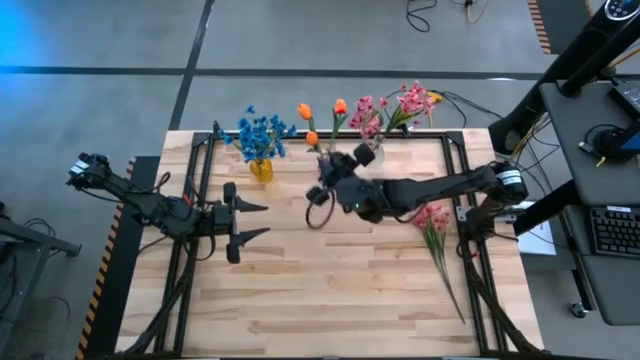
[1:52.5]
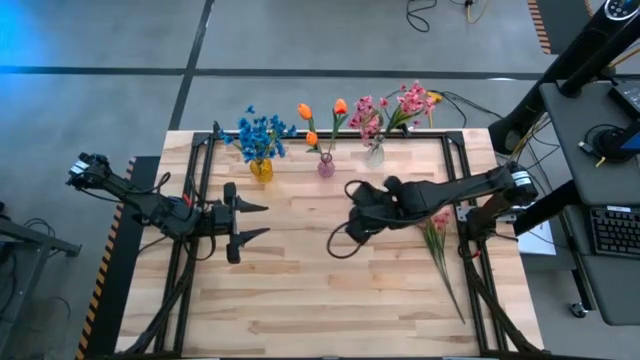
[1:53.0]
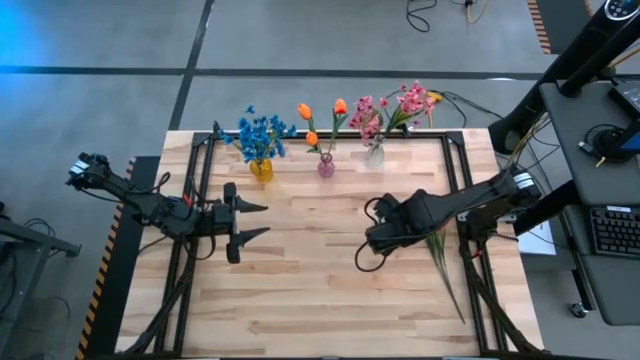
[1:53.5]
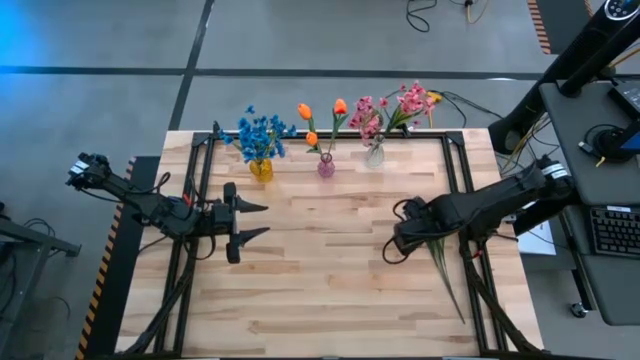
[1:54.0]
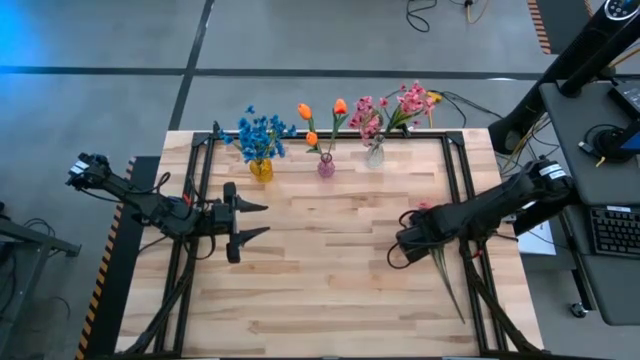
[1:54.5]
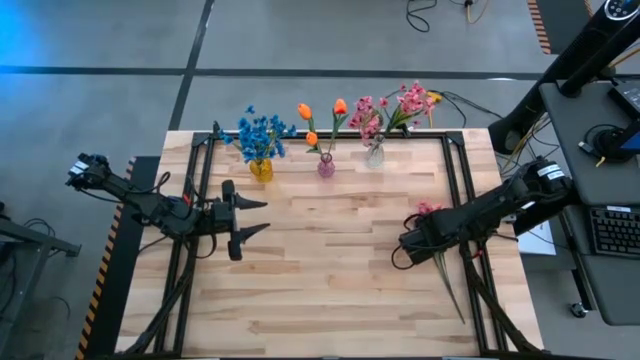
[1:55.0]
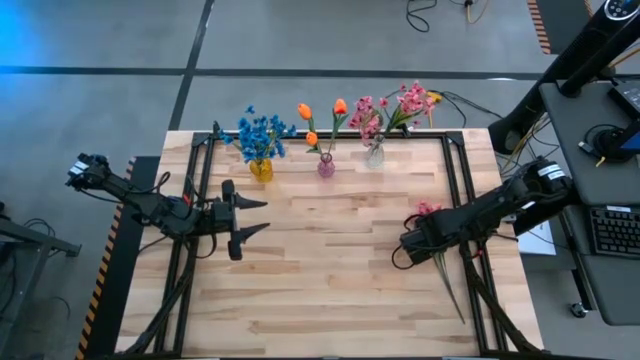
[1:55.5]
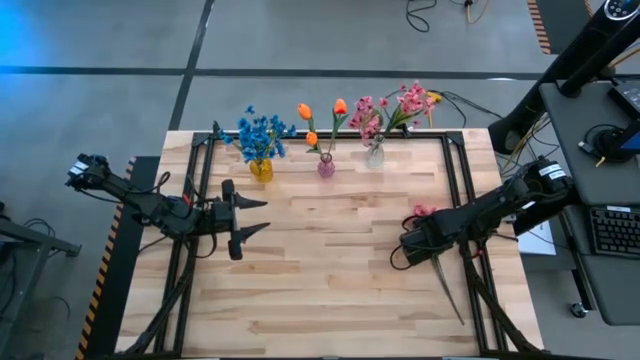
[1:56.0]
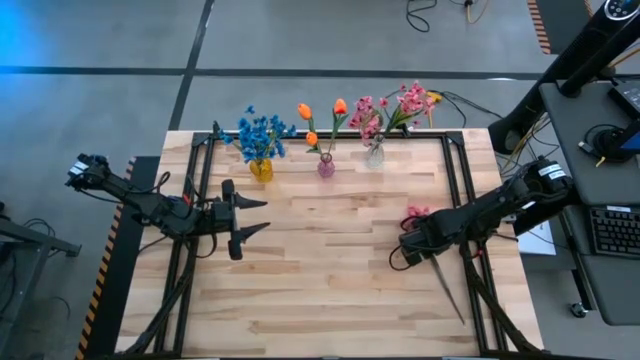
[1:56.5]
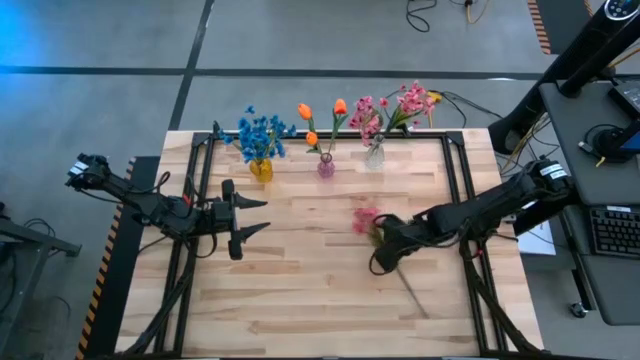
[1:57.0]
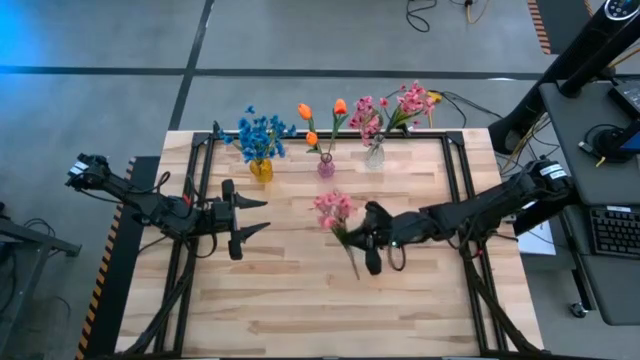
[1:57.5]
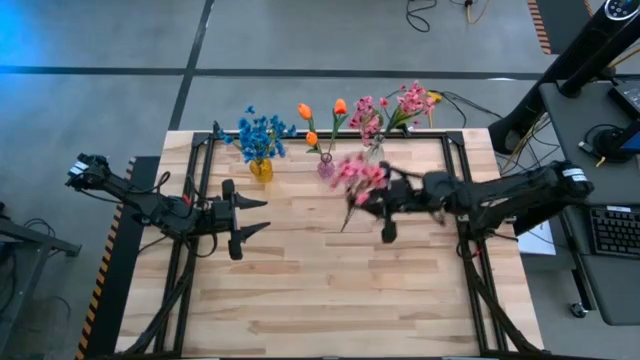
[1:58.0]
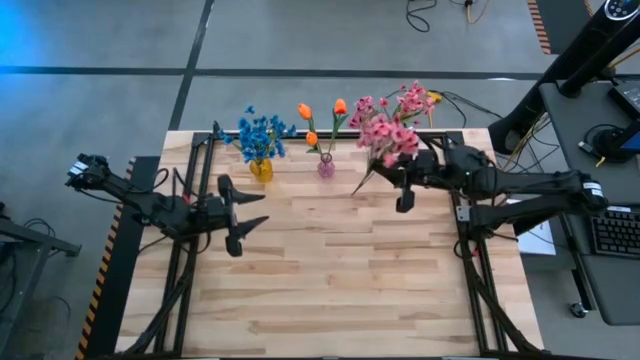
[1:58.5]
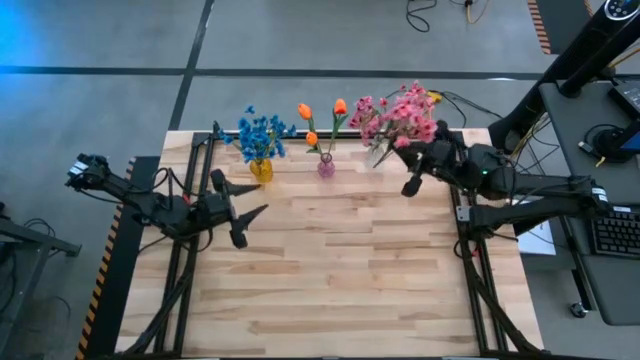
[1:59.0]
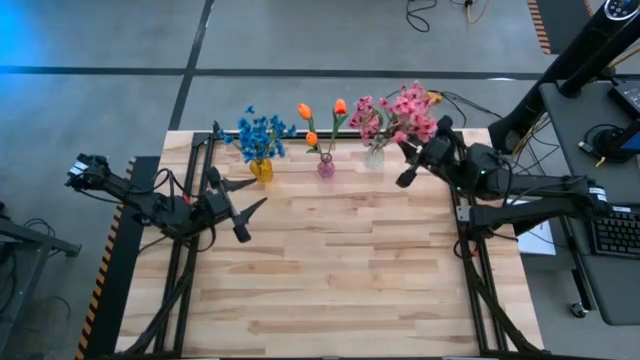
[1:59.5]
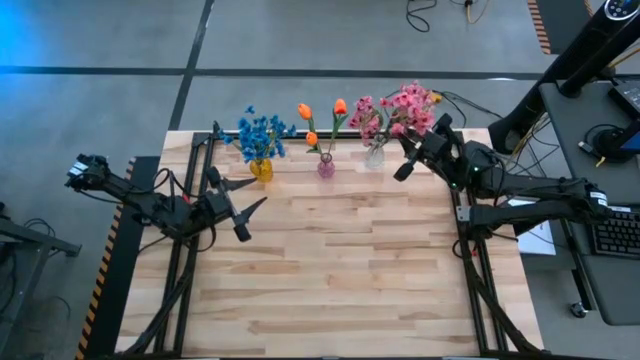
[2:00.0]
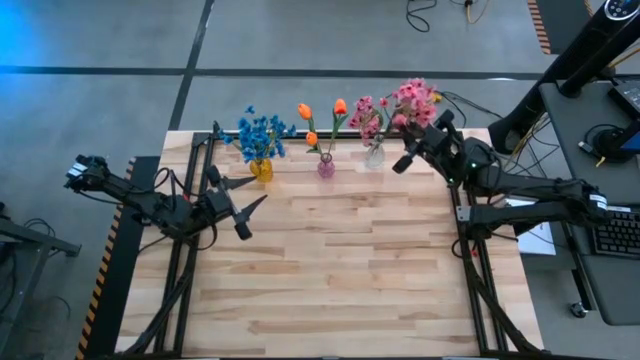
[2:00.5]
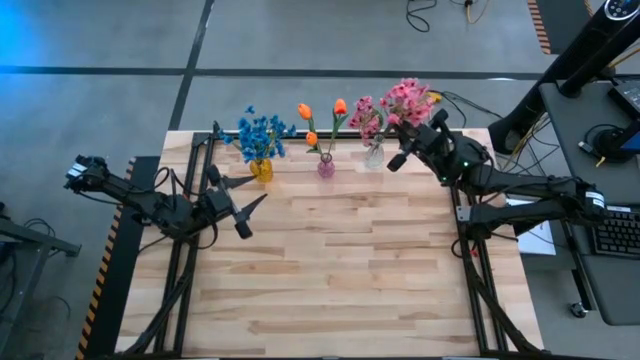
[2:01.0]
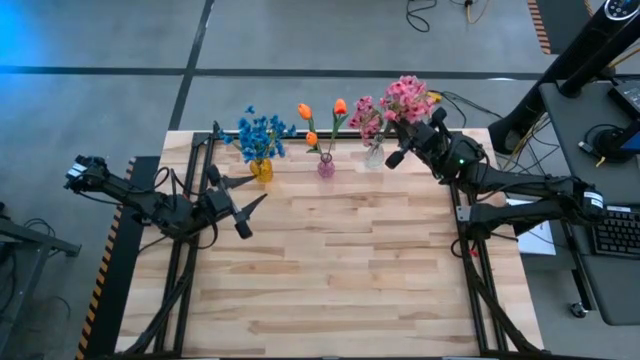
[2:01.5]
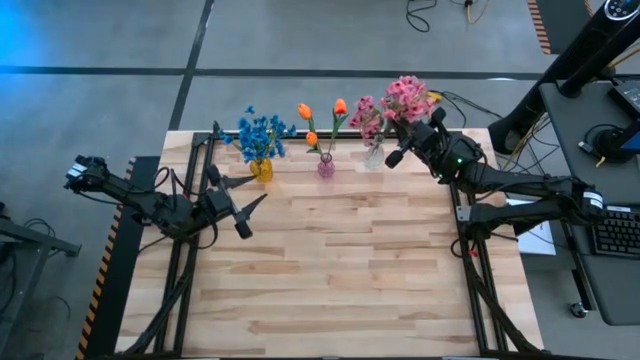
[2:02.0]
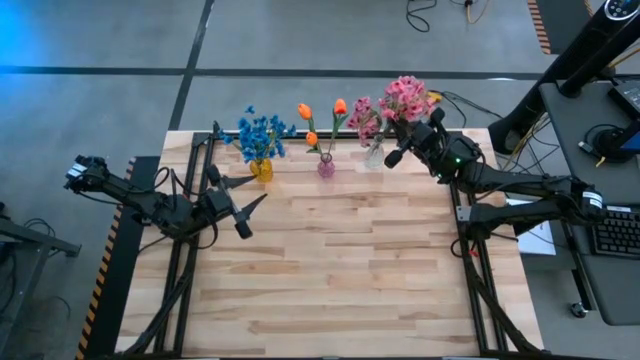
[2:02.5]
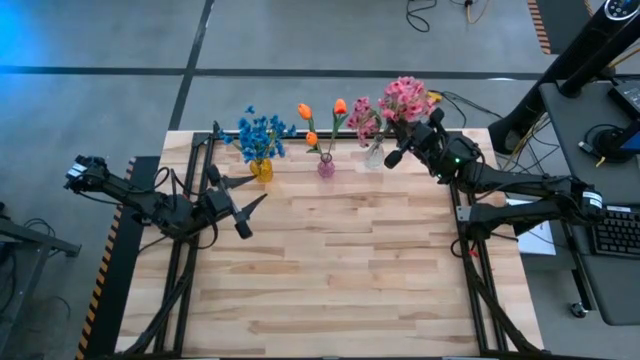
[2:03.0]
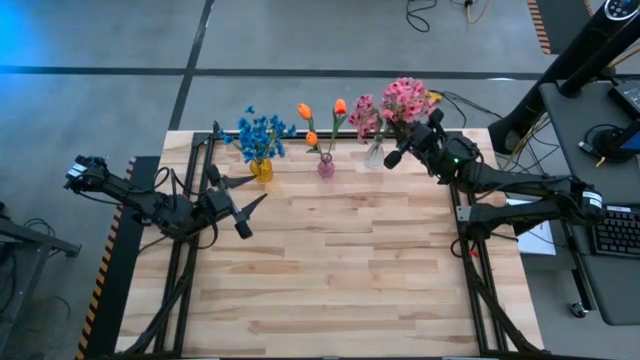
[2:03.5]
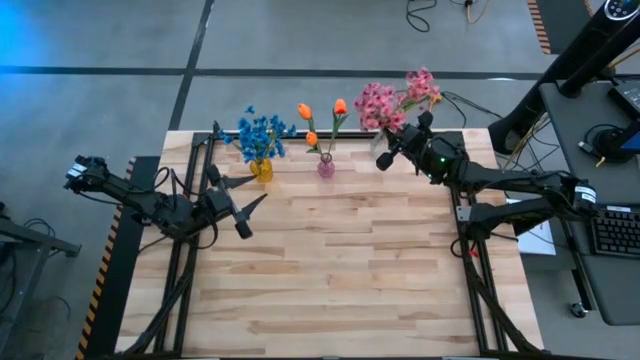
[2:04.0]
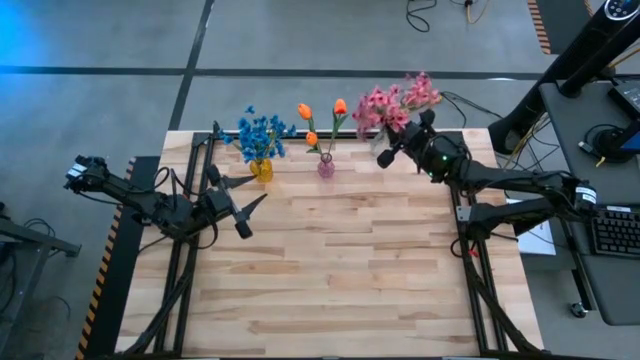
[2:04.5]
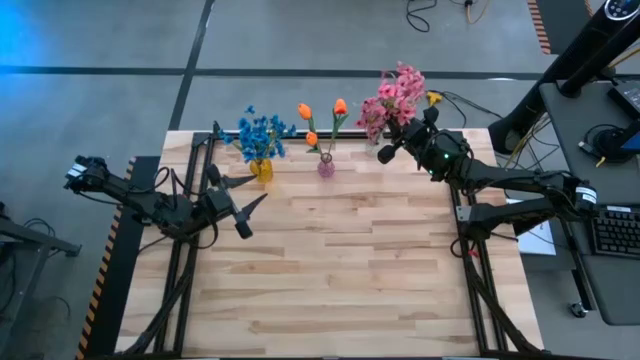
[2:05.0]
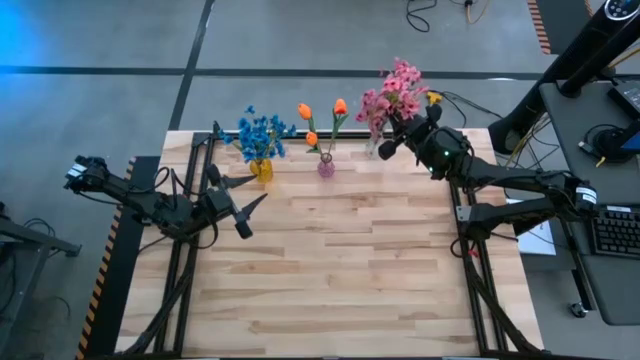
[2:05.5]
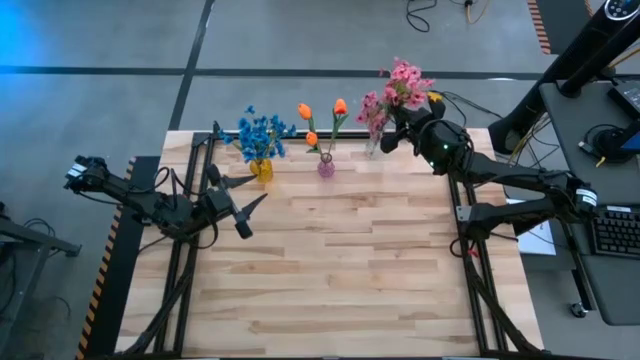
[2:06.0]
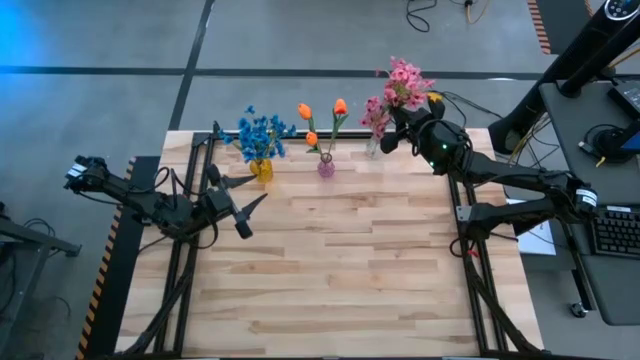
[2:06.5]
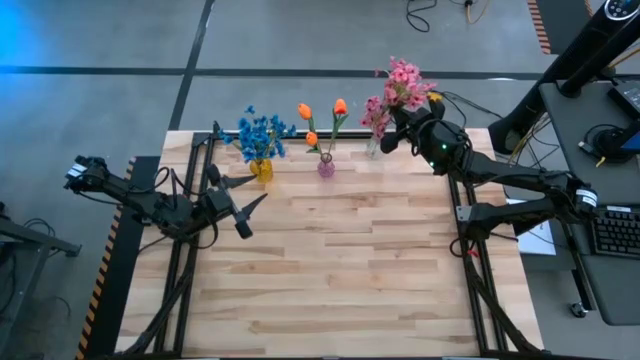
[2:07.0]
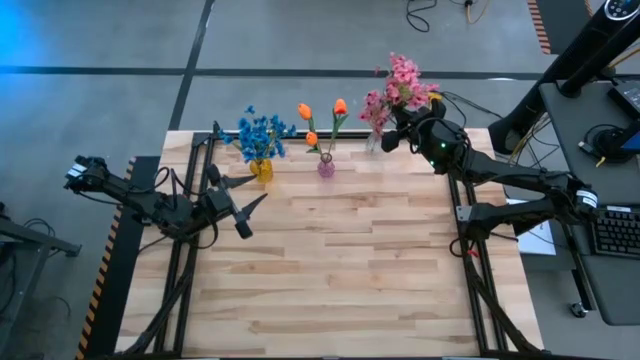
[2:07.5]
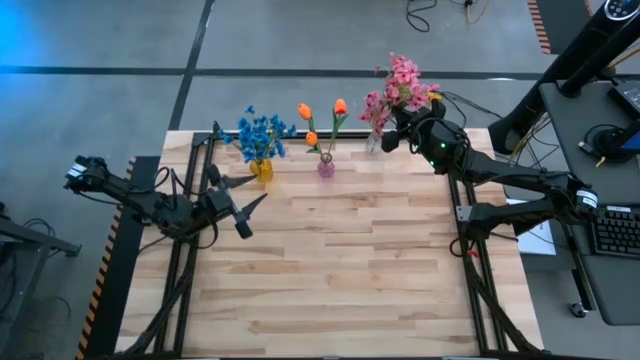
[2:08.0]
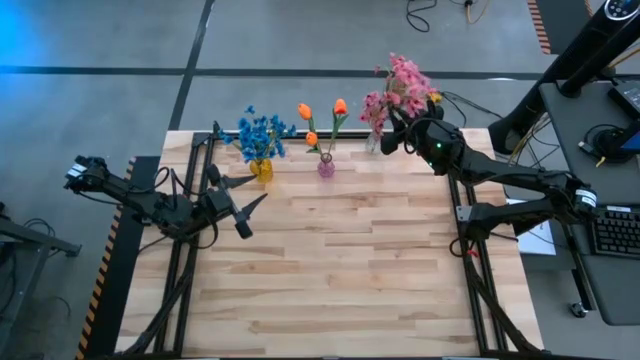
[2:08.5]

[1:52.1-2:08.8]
Task: Sort flowers into vase by color
Put the pink flowers into the transparent vase
